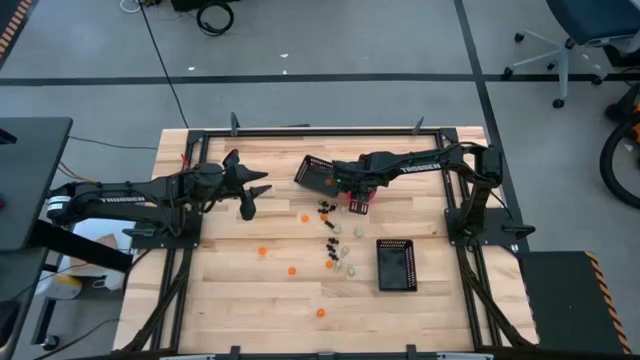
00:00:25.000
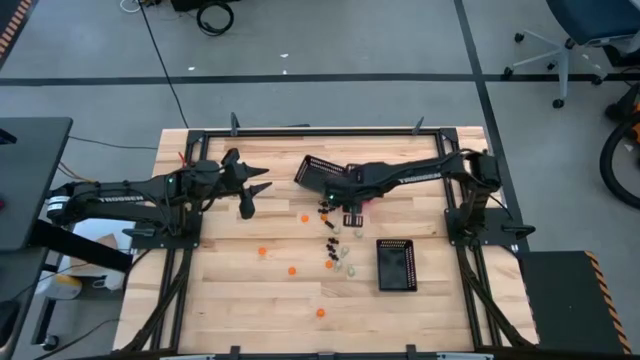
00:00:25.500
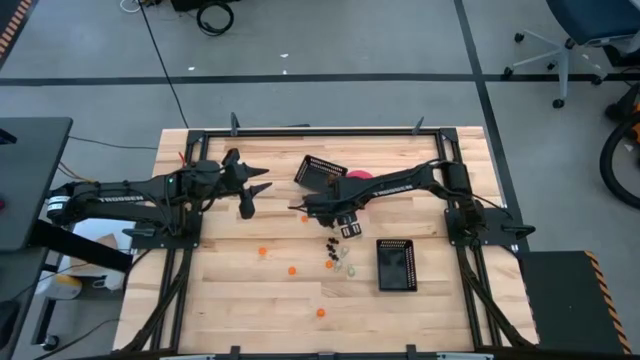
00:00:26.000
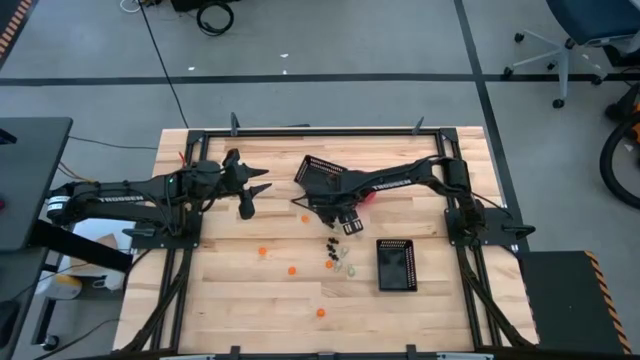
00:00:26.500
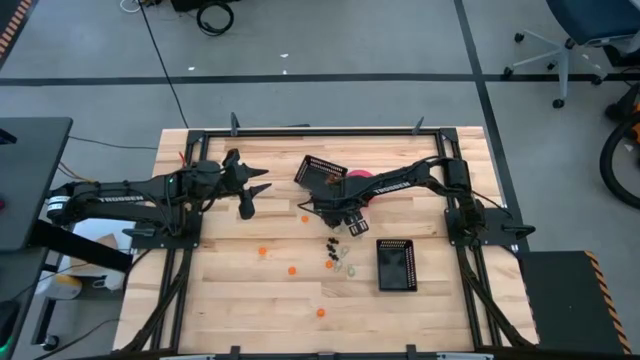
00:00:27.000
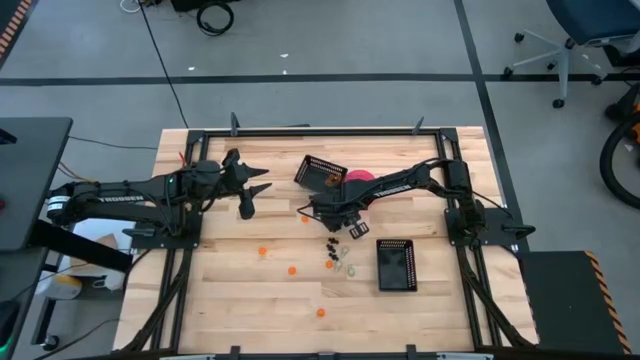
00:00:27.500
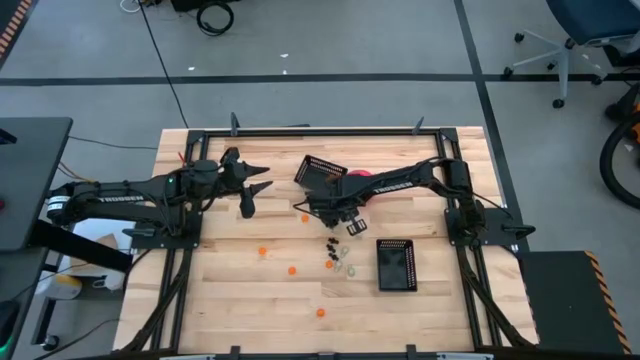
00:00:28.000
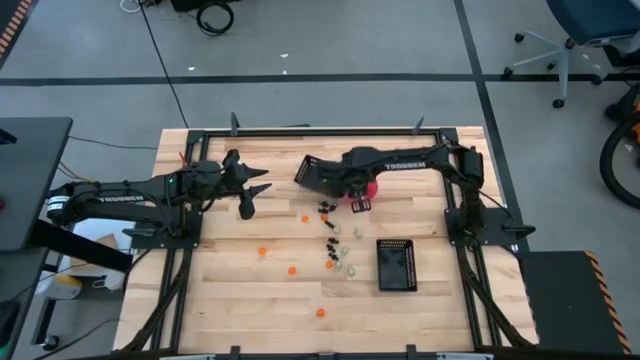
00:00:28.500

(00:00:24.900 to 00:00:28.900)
Task: Sort Halloween decoration
Put the white skull toy into the pink bowl

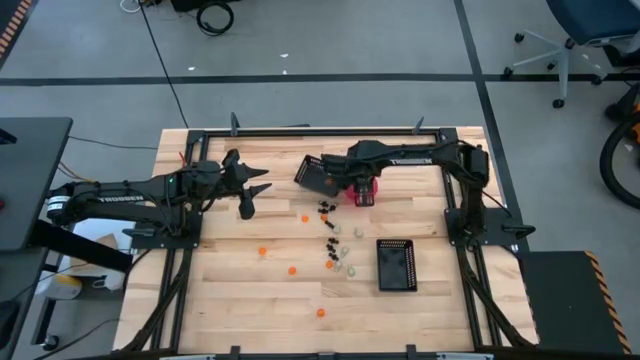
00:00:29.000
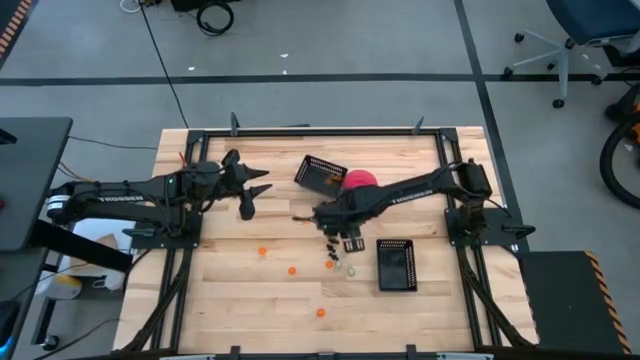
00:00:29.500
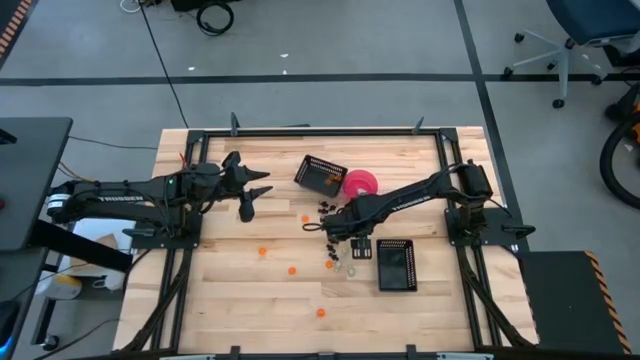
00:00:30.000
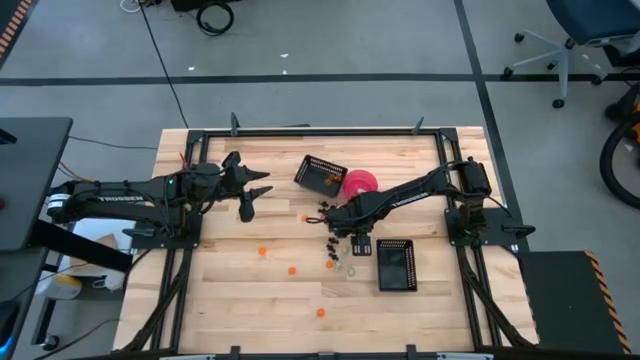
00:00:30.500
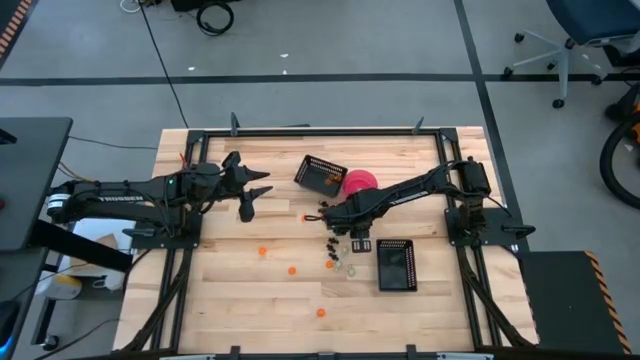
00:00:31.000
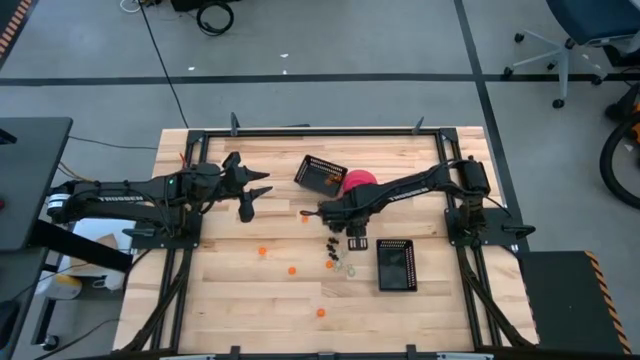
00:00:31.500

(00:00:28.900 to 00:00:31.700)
Put the white skull toy into the pink bowl

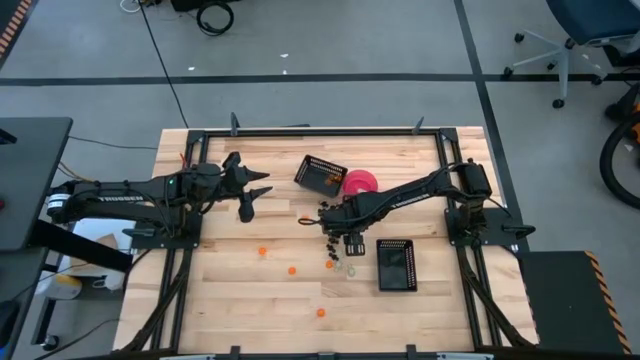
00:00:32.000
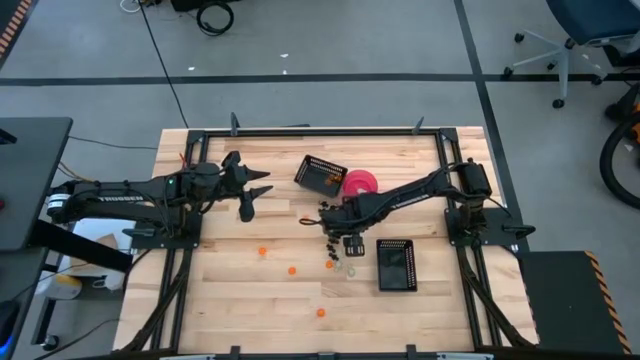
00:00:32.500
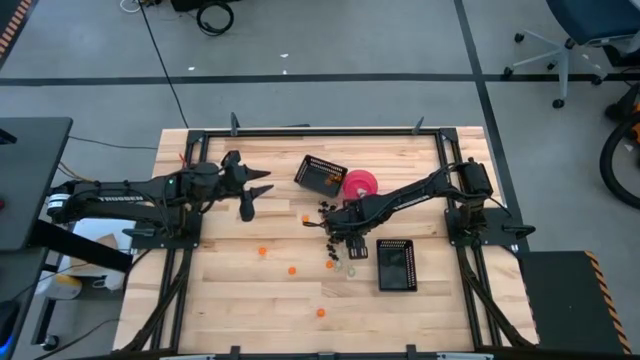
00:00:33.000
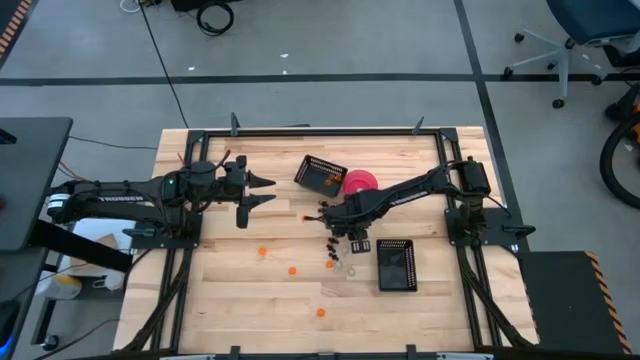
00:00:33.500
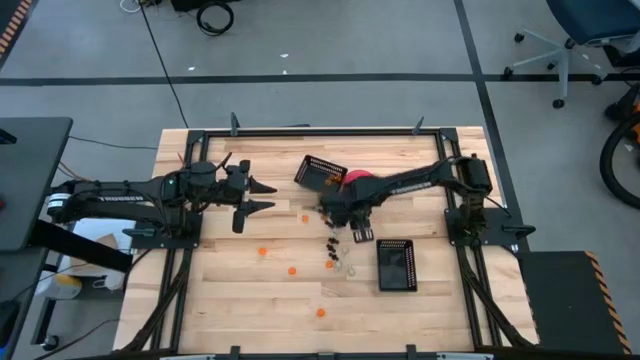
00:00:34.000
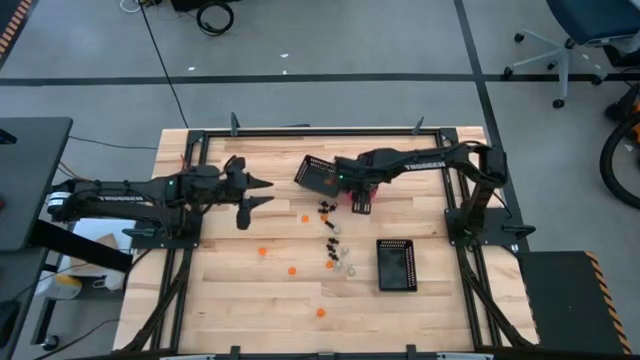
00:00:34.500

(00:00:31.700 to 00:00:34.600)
Put the white skull toy into the pink bowl

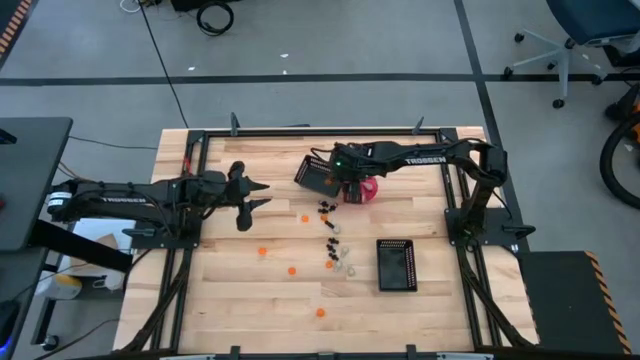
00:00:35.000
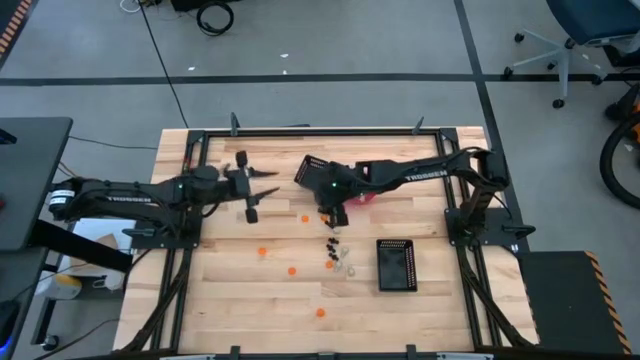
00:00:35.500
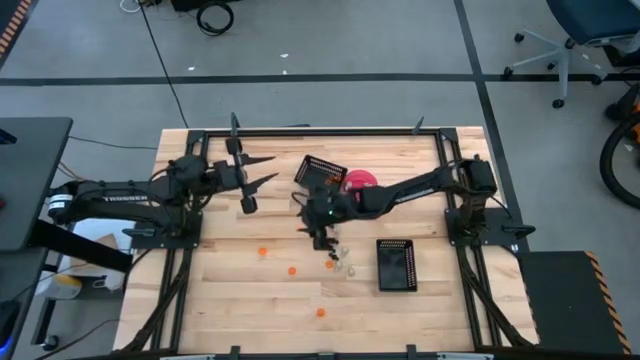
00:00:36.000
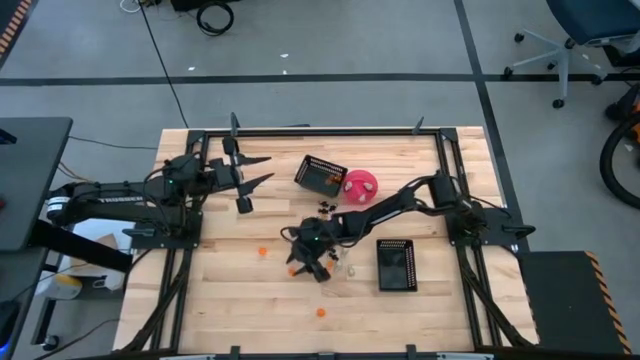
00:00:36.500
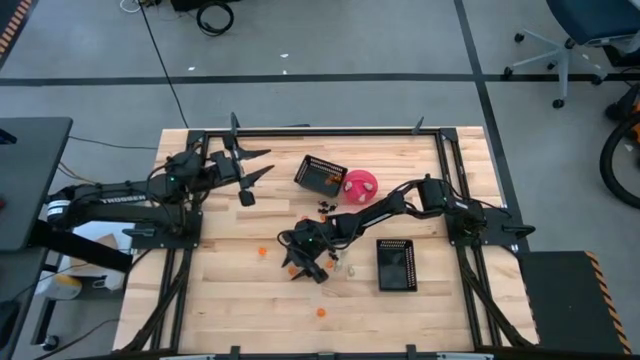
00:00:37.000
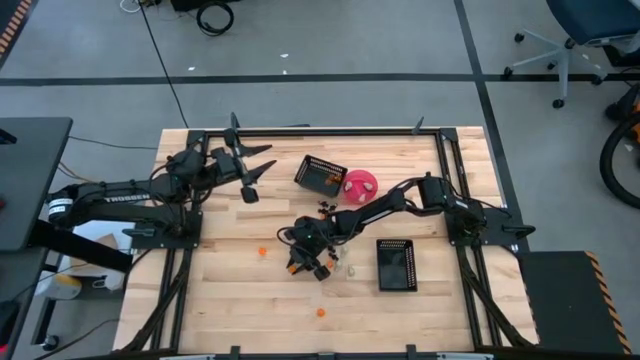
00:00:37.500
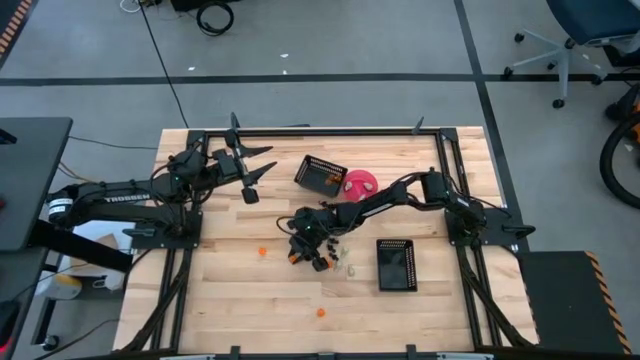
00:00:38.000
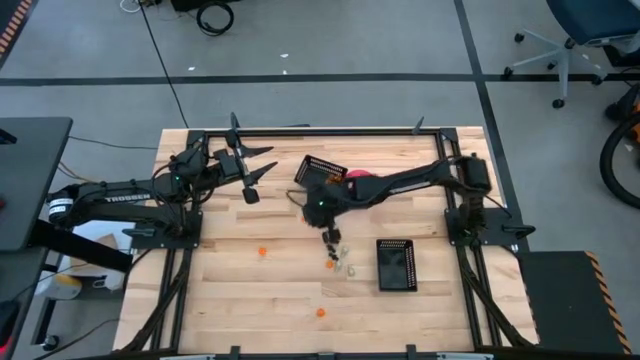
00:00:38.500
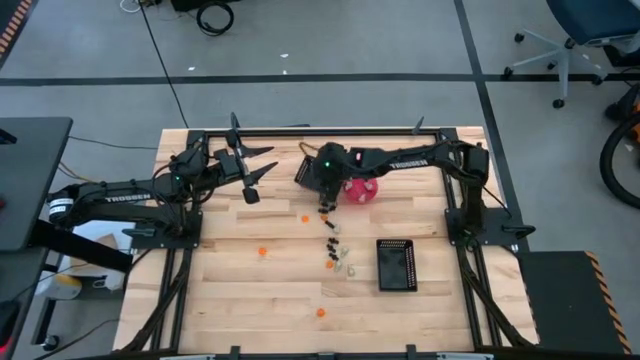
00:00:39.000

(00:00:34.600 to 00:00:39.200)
Put the orange pumpkin toy into the black bin

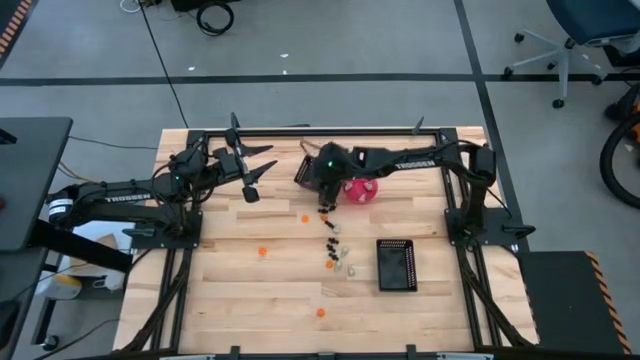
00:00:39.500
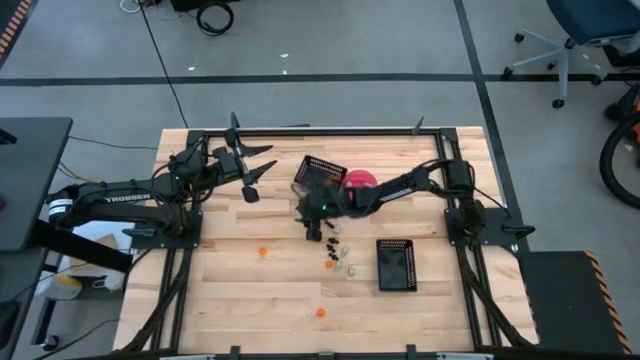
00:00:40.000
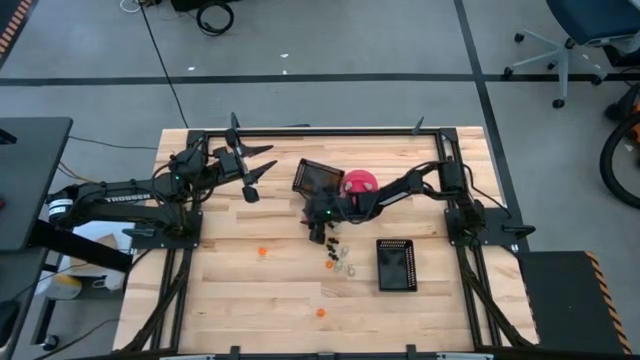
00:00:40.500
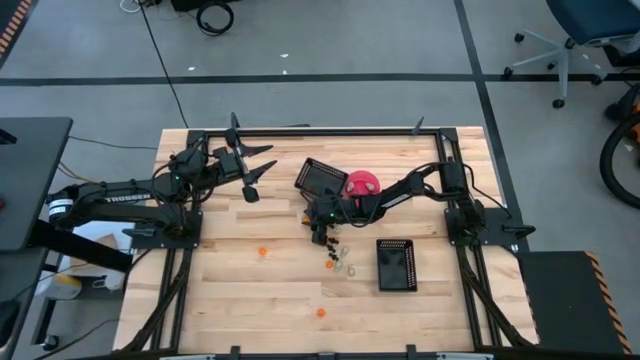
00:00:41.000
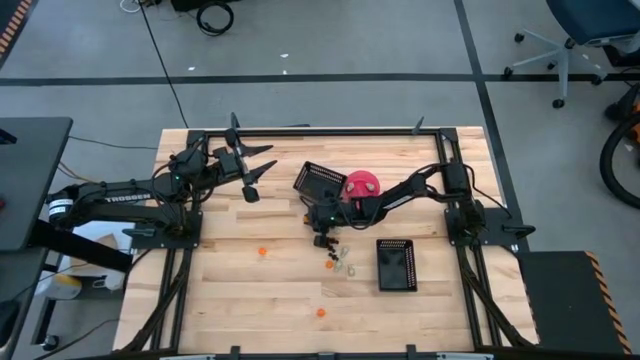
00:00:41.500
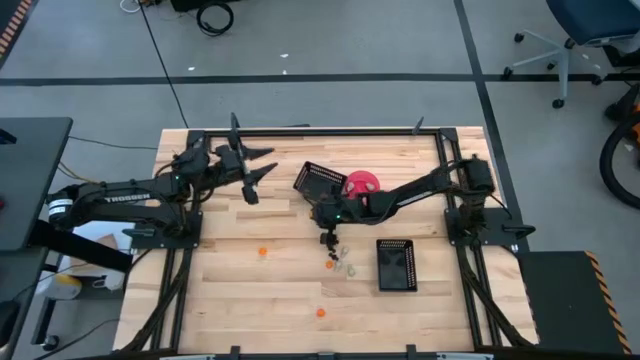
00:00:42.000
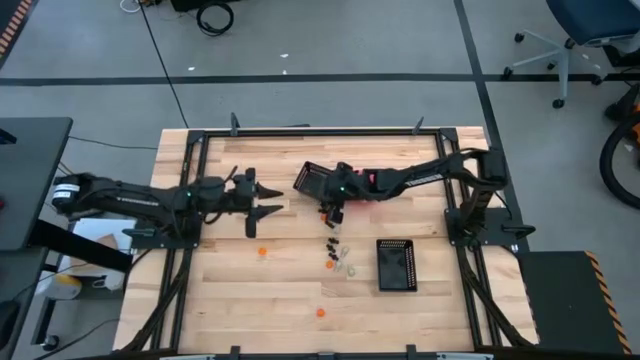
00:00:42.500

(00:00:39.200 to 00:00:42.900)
Put the orange pumpkin toy into the top black bin

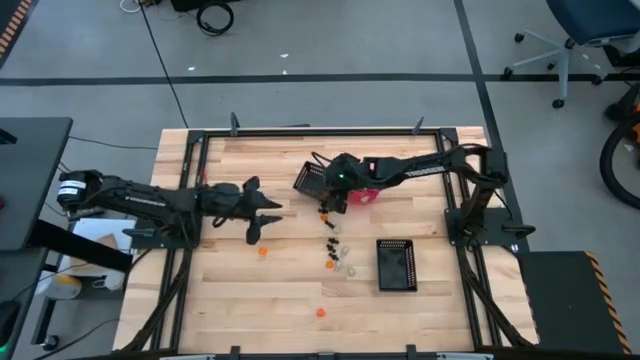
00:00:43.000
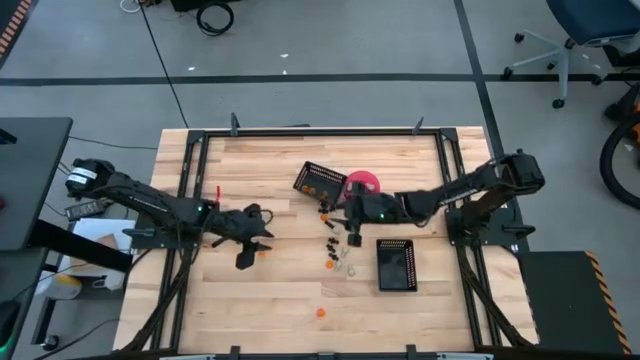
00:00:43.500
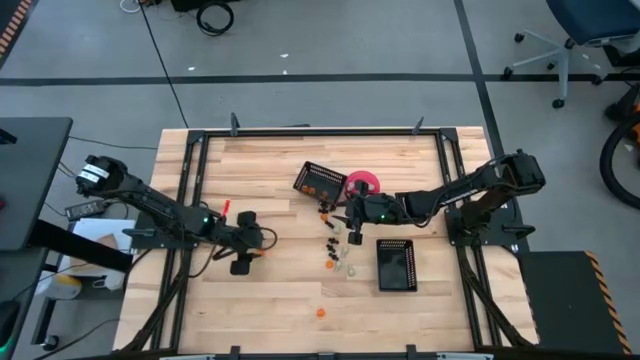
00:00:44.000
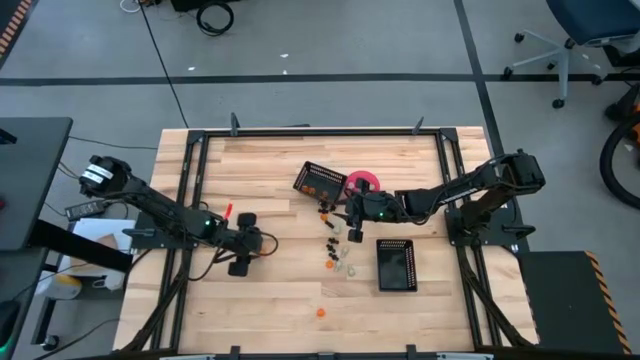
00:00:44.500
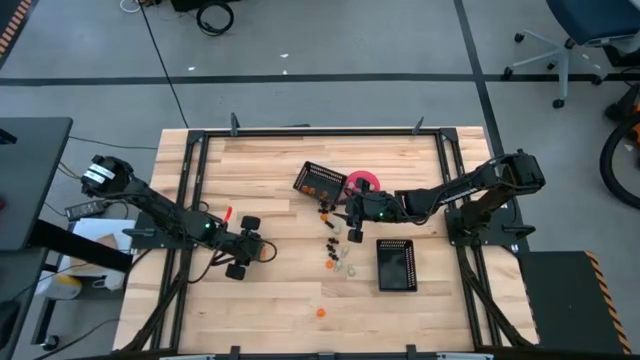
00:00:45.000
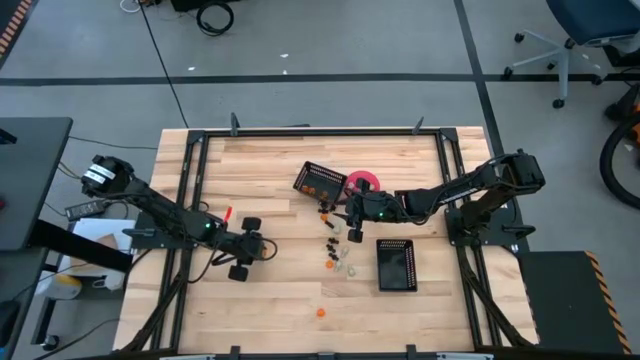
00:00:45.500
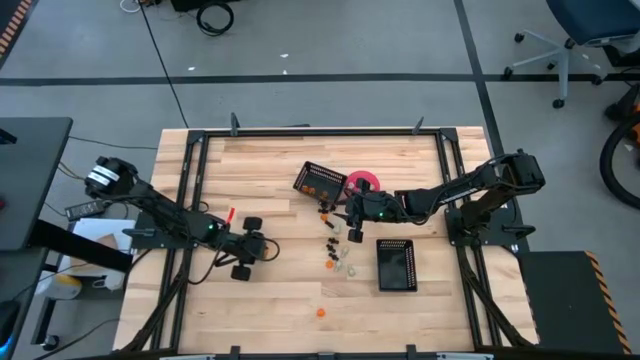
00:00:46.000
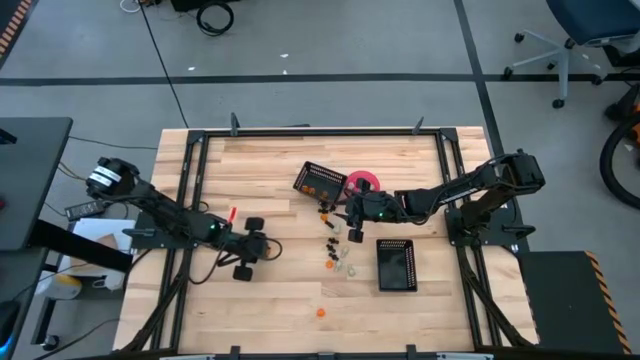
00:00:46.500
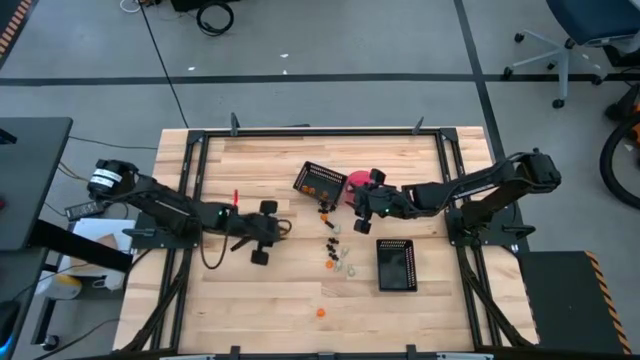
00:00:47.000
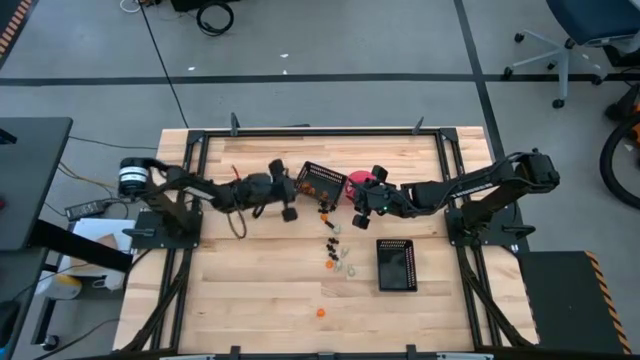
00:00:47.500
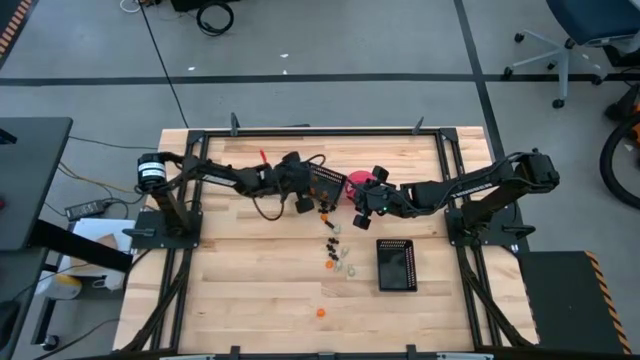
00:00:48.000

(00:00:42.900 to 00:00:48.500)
Put the the orange pumpkin toy the top black bin
